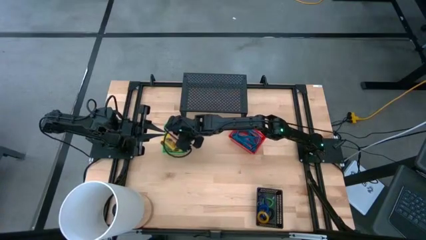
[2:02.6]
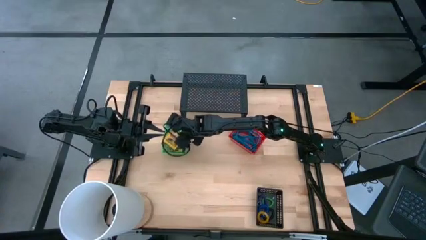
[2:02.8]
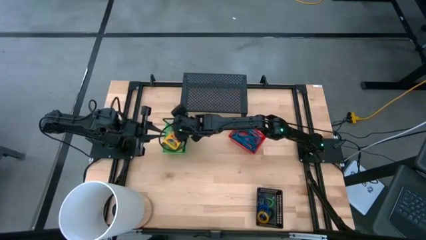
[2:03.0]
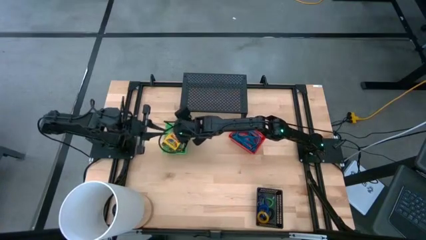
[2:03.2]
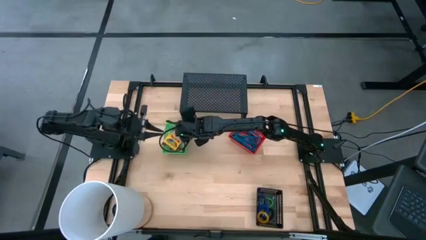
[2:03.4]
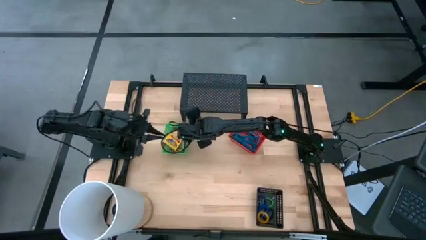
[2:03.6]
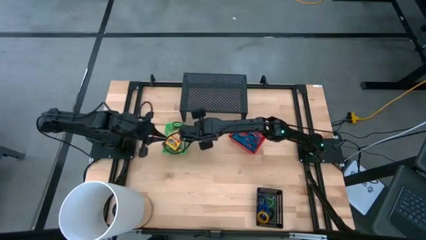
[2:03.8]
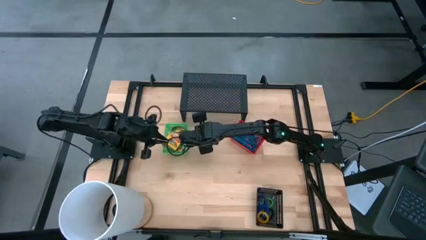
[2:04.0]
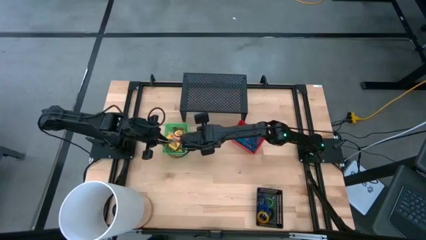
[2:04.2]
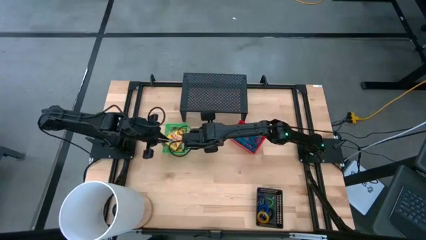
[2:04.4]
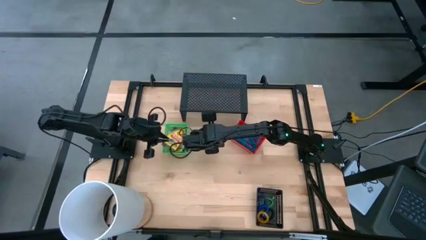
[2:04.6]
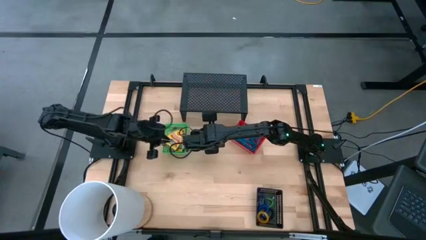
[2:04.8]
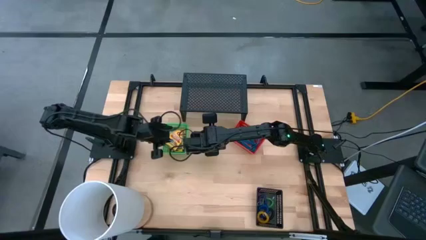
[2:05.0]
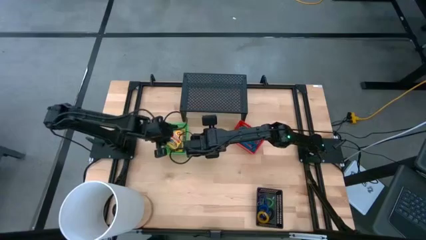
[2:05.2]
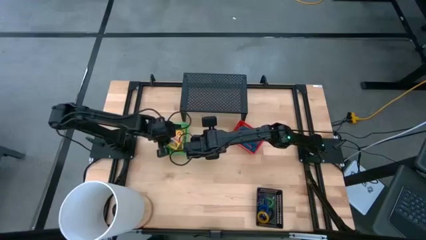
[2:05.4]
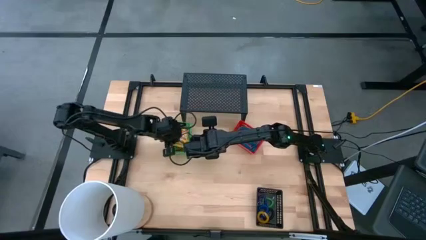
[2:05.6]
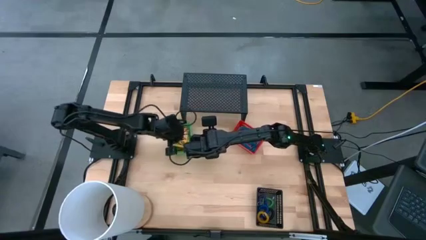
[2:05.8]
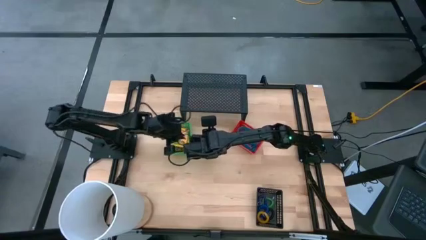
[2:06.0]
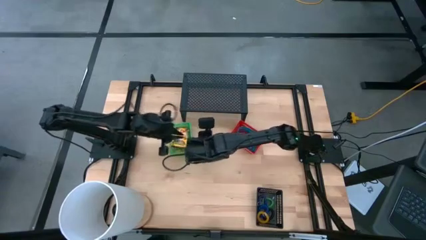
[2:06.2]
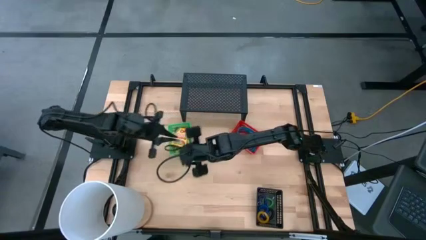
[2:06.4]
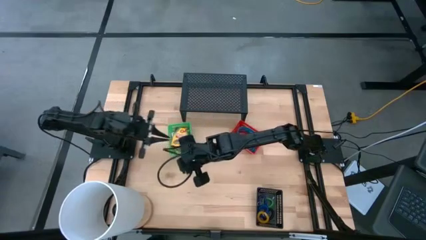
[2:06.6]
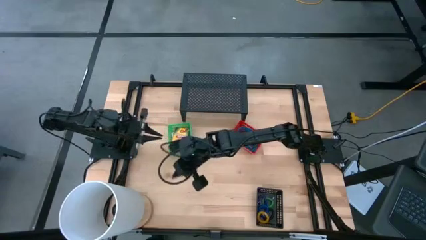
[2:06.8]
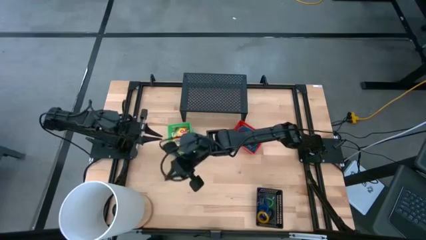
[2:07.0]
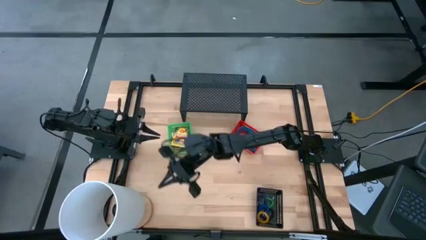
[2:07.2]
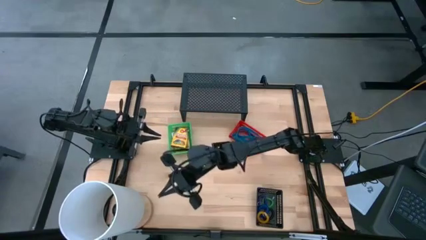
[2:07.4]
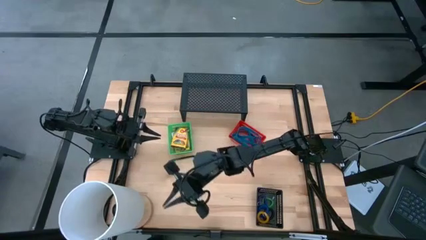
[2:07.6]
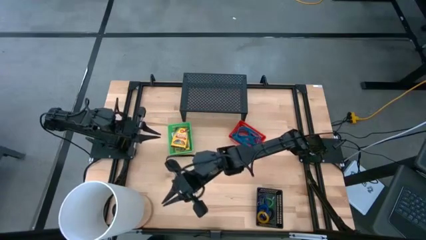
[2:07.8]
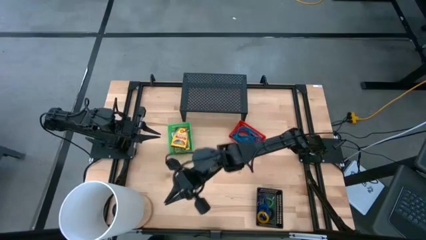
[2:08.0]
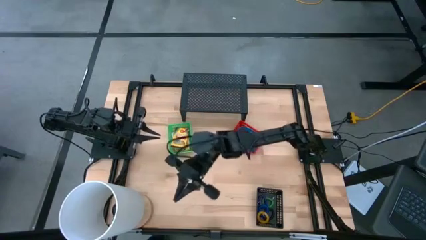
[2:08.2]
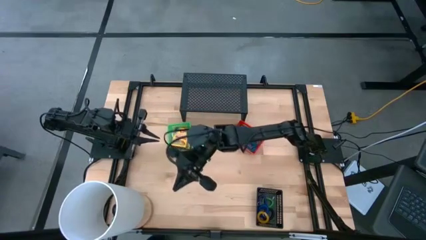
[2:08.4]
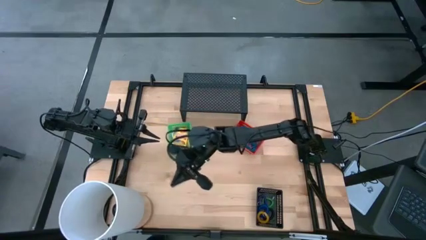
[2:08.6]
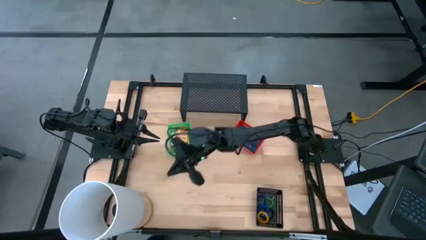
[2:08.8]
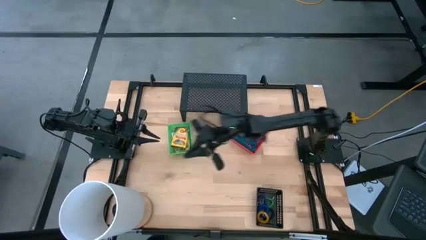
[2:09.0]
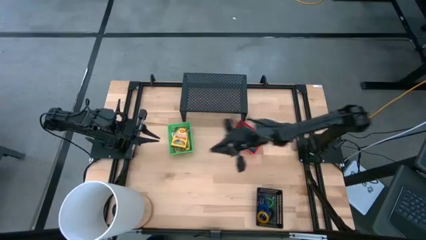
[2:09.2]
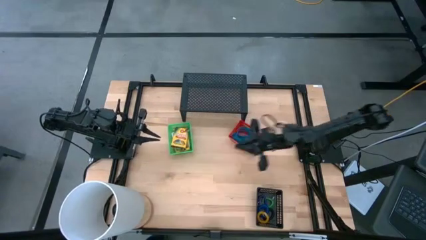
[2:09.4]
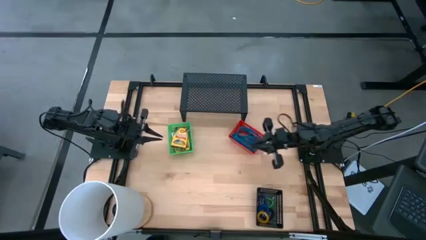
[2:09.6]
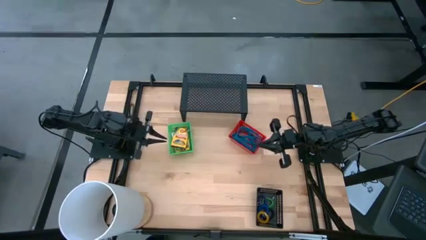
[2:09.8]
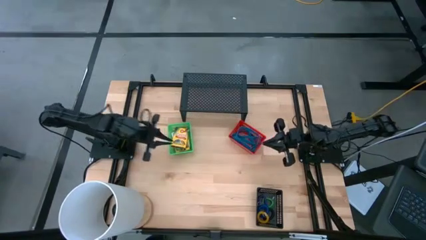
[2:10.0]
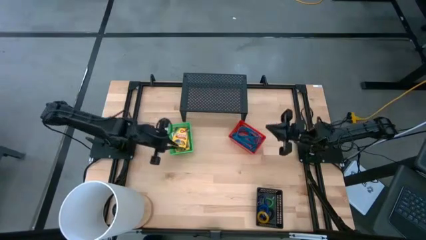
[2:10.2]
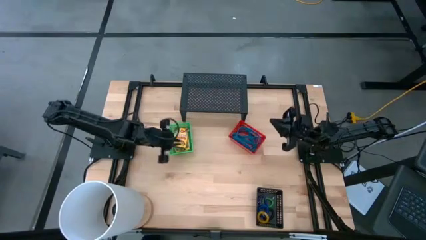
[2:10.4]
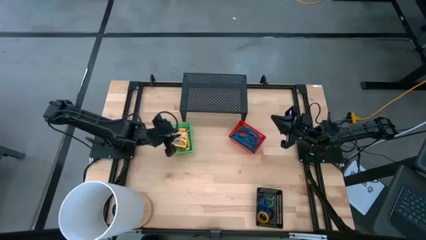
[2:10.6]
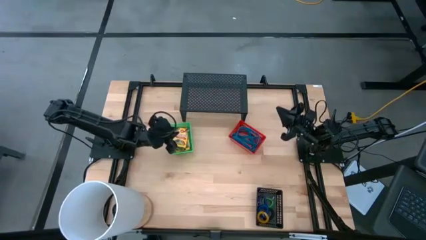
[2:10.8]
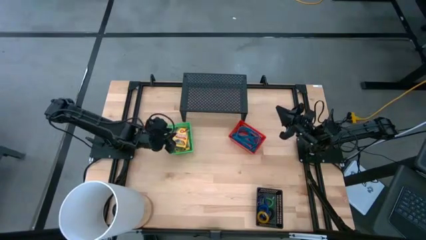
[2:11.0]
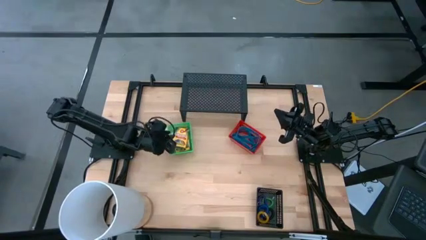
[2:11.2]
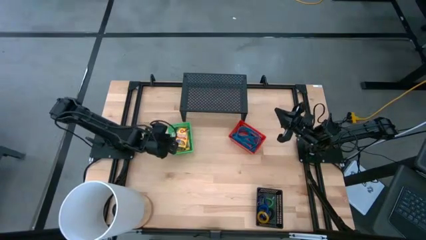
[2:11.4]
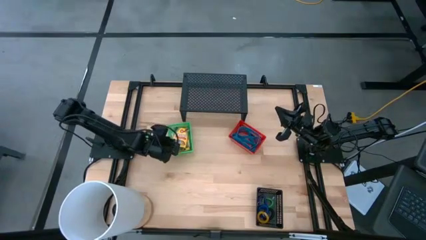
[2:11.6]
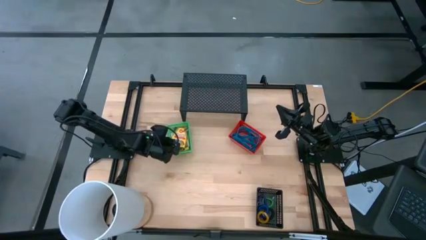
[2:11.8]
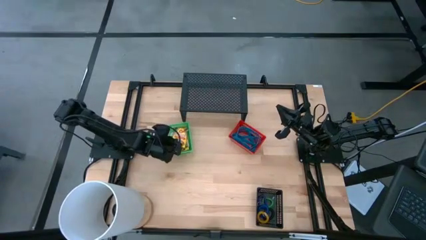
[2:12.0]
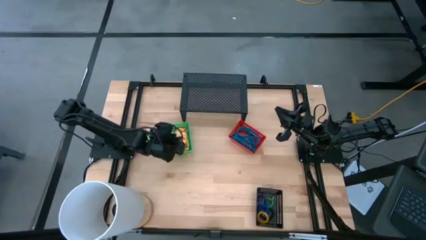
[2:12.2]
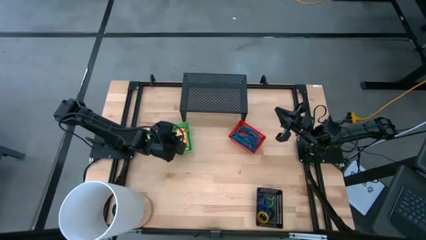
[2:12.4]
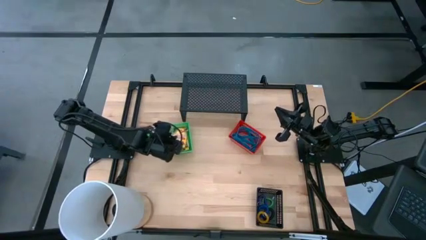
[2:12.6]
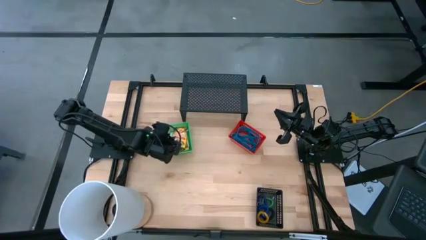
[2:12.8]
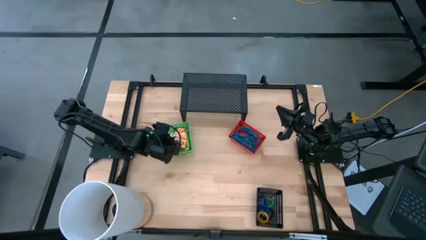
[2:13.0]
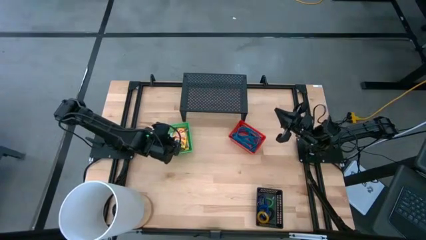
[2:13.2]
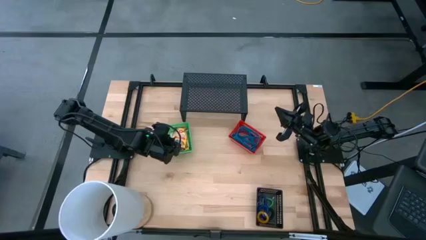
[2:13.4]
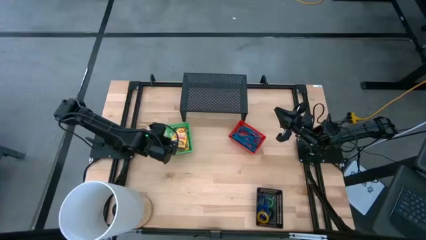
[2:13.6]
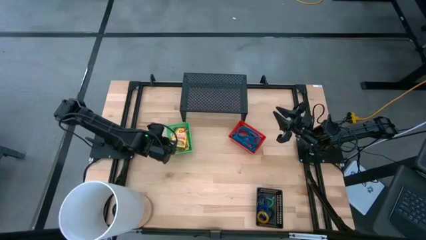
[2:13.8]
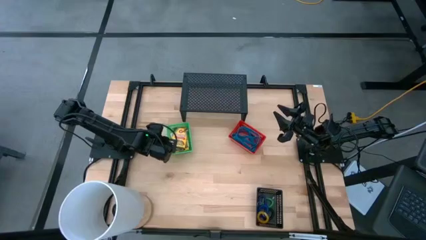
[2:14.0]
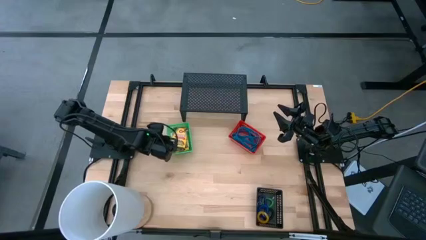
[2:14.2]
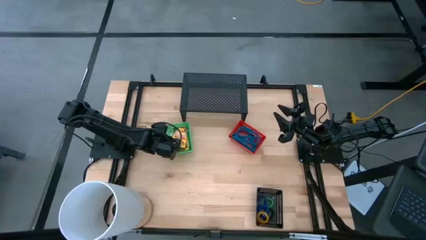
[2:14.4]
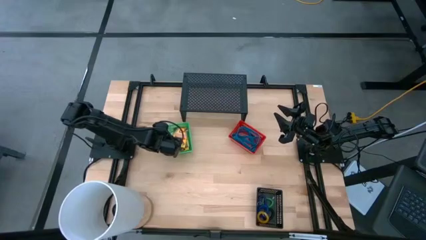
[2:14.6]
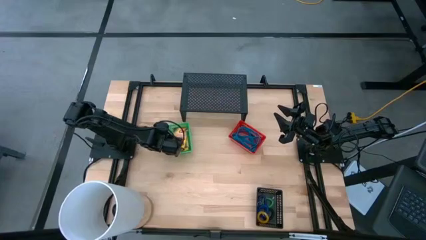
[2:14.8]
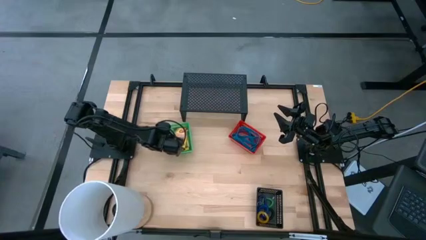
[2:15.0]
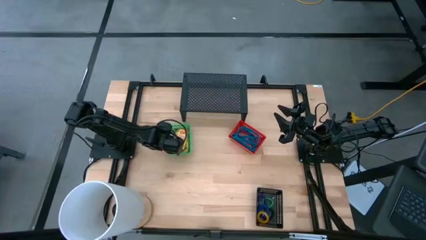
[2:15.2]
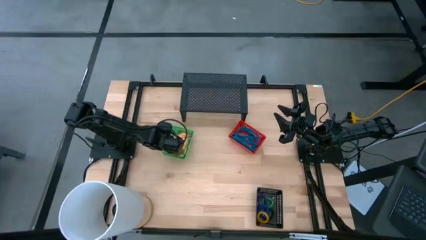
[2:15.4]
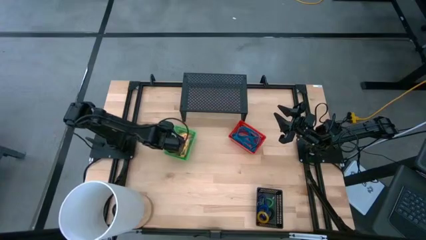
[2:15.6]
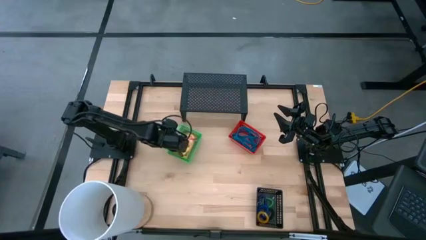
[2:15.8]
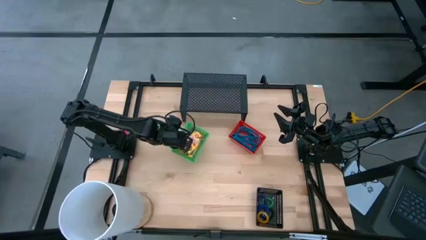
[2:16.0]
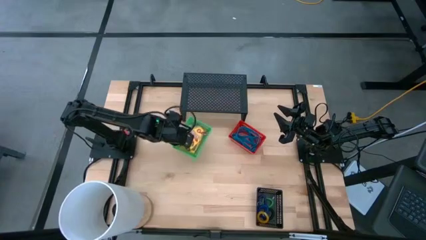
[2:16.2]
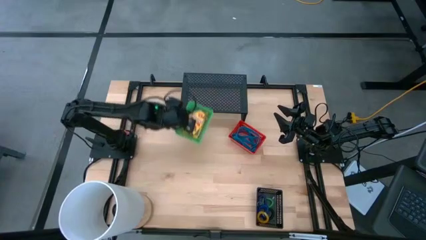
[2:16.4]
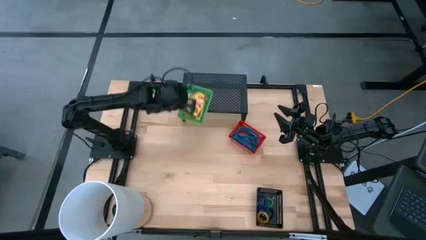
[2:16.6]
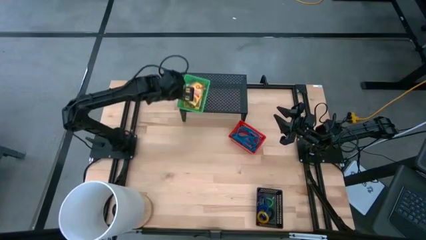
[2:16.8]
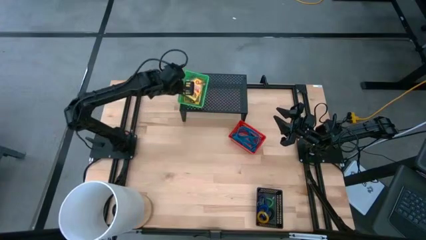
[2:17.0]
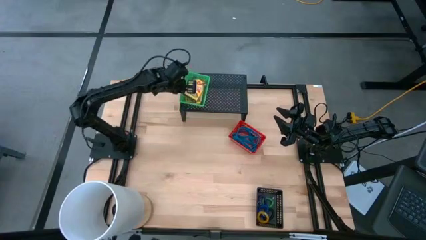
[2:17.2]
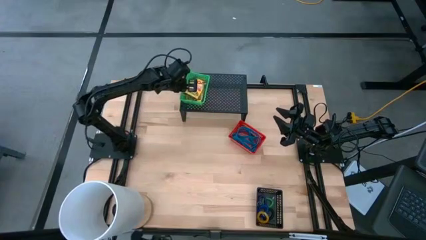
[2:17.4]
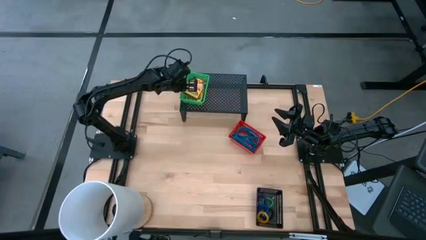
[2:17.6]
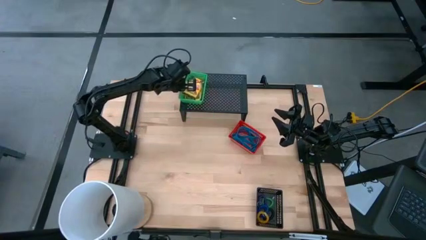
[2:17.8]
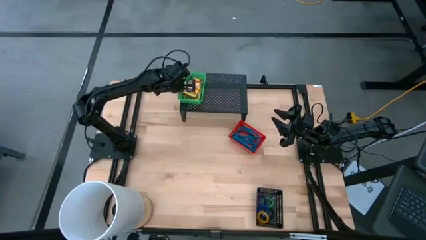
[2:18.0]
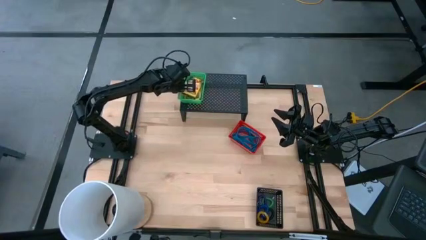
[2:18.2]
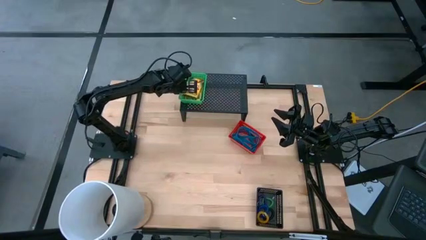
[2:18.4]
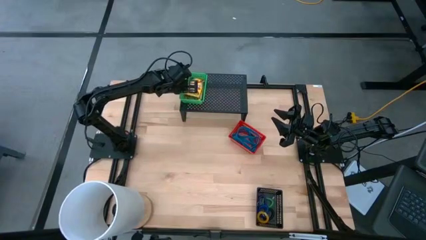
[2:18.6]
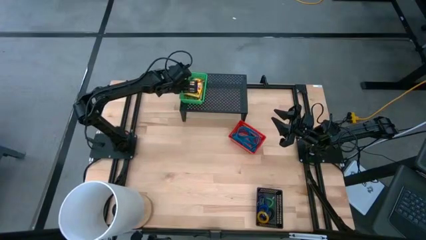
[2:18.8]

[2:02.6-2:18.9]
Task: Pick & Place Office Desk Supplies
Put the green bin on the shelf
